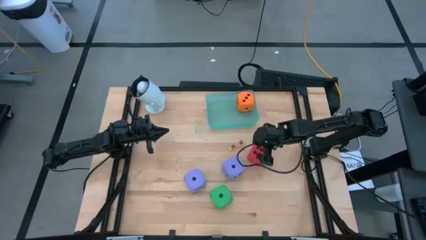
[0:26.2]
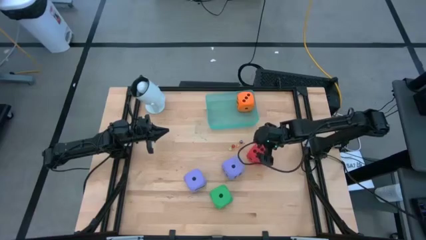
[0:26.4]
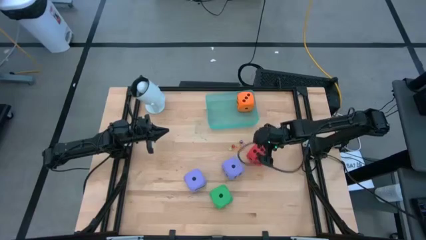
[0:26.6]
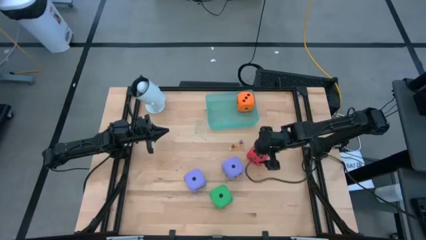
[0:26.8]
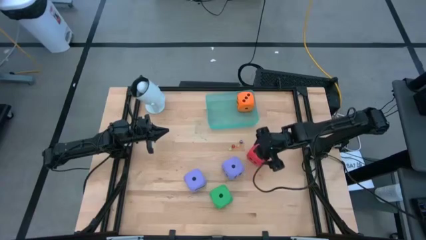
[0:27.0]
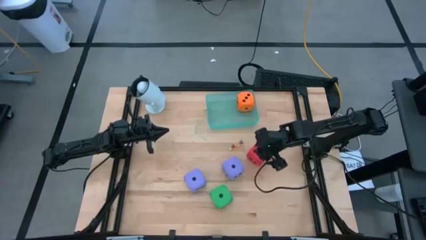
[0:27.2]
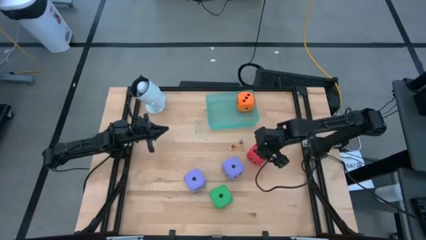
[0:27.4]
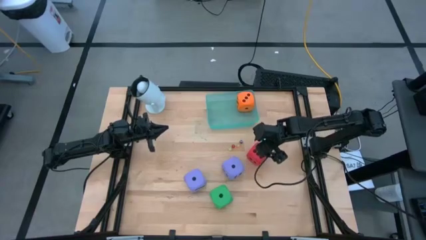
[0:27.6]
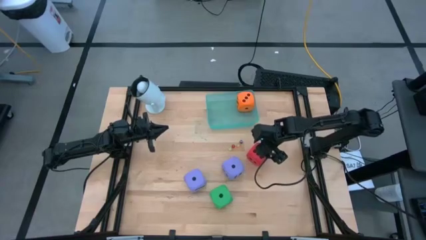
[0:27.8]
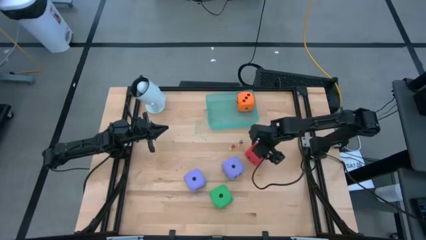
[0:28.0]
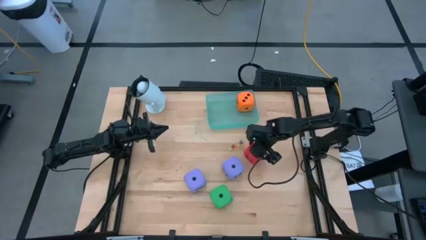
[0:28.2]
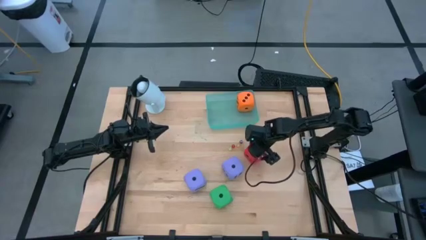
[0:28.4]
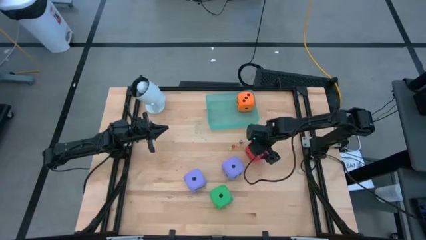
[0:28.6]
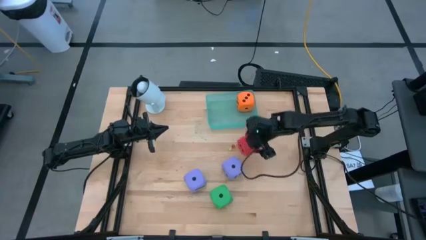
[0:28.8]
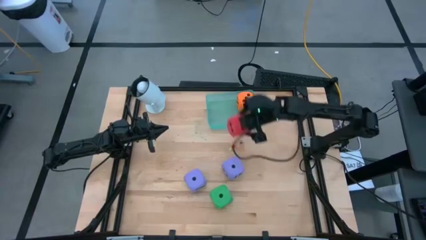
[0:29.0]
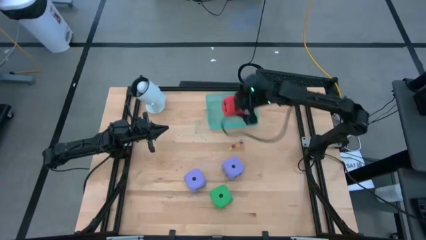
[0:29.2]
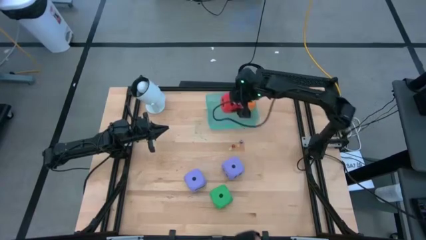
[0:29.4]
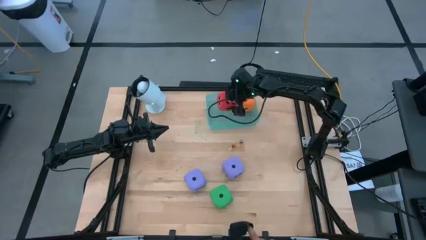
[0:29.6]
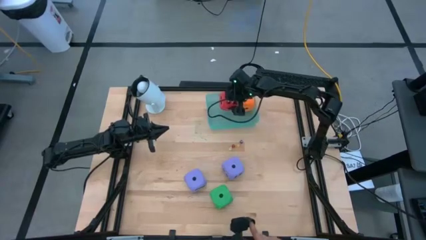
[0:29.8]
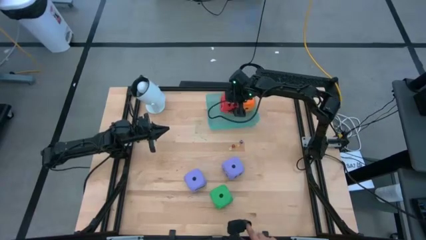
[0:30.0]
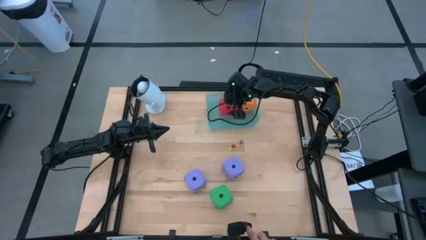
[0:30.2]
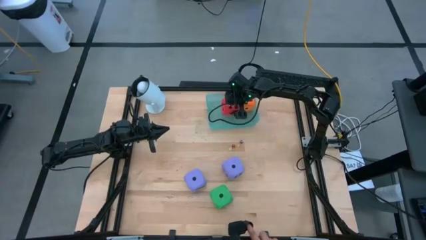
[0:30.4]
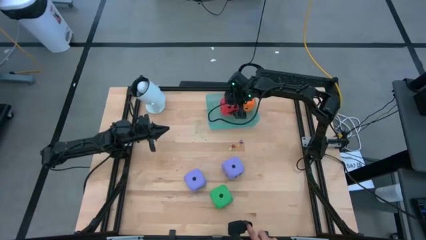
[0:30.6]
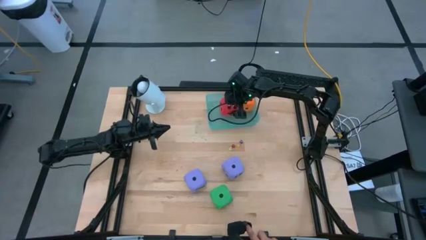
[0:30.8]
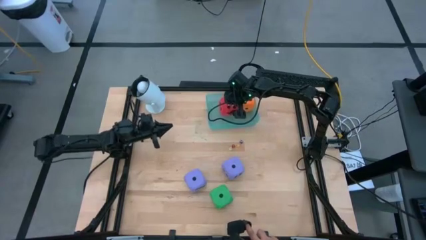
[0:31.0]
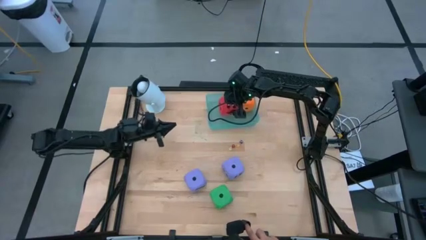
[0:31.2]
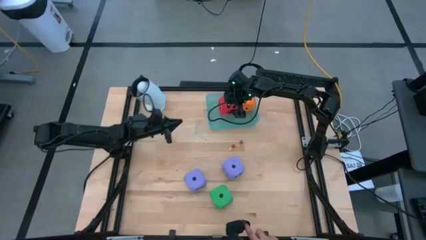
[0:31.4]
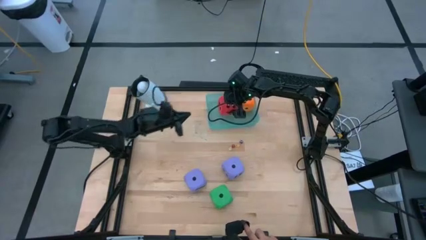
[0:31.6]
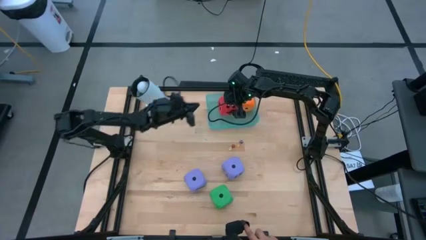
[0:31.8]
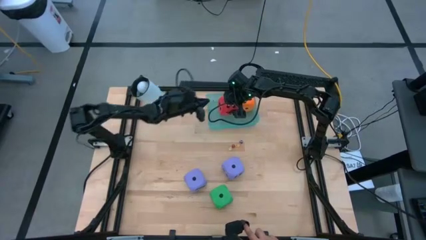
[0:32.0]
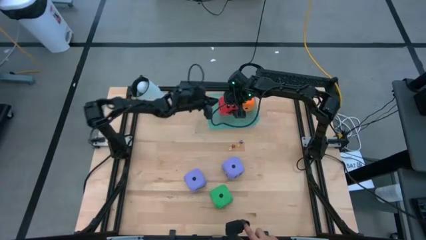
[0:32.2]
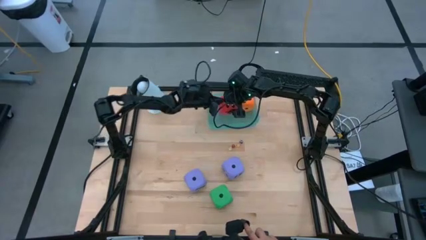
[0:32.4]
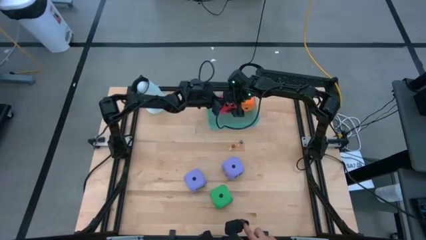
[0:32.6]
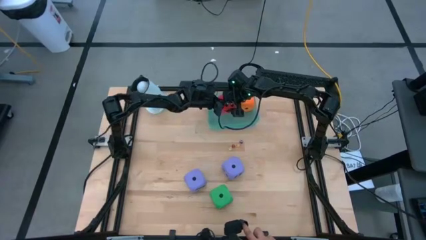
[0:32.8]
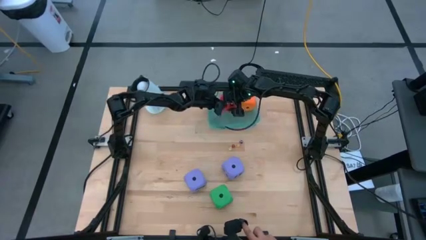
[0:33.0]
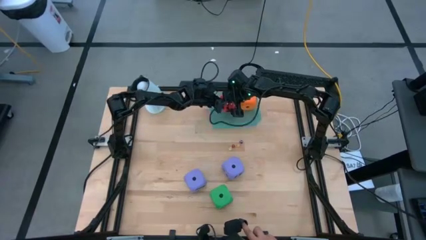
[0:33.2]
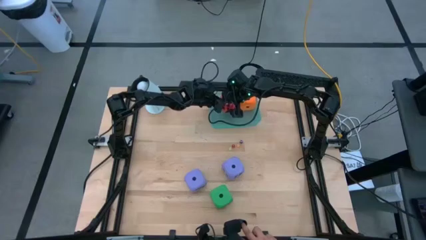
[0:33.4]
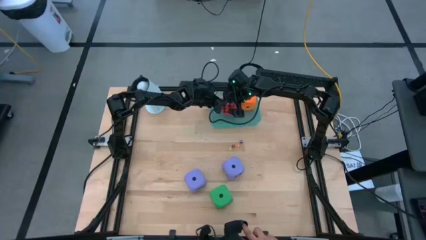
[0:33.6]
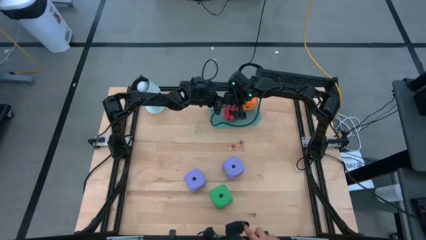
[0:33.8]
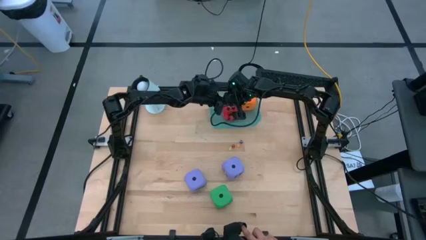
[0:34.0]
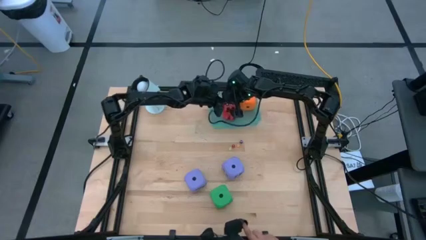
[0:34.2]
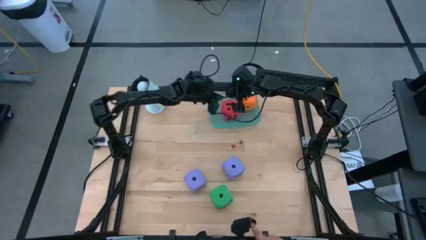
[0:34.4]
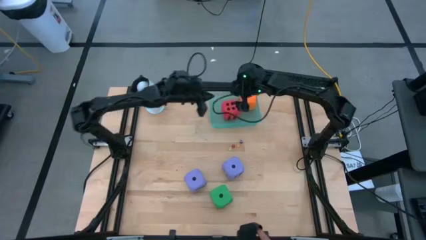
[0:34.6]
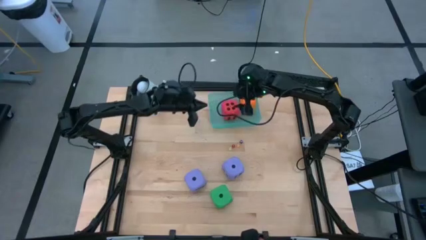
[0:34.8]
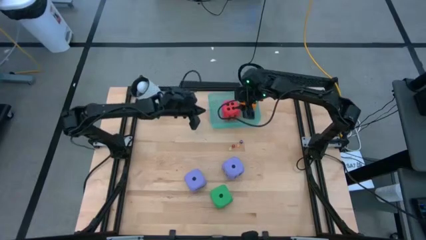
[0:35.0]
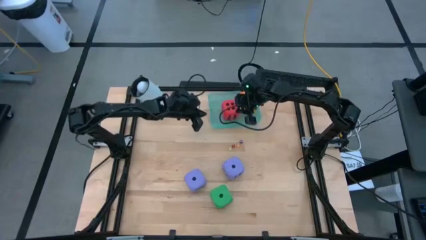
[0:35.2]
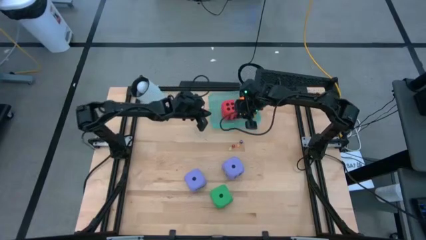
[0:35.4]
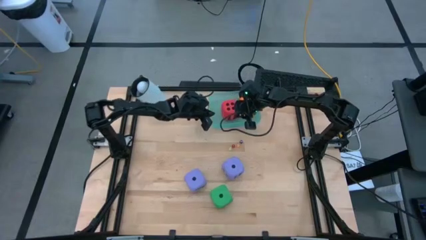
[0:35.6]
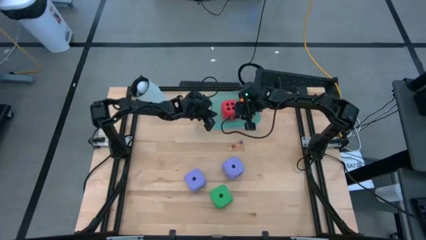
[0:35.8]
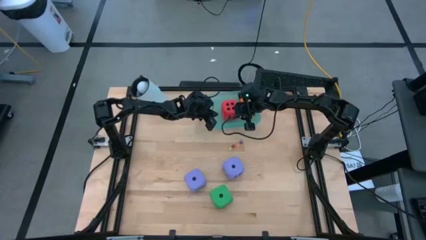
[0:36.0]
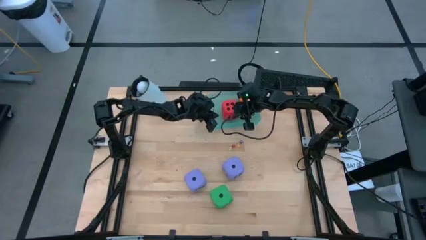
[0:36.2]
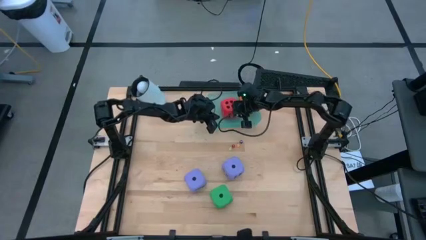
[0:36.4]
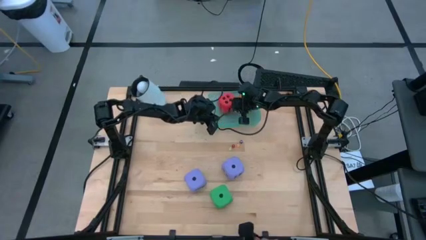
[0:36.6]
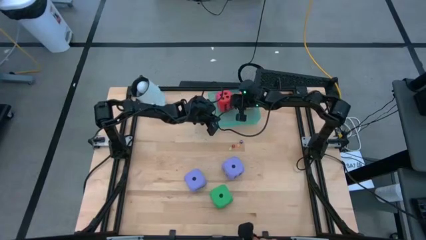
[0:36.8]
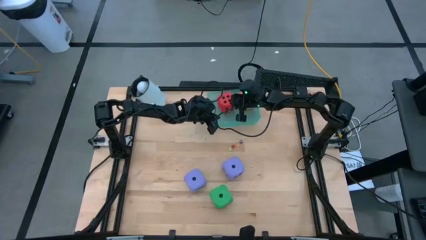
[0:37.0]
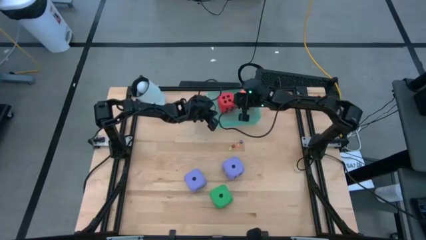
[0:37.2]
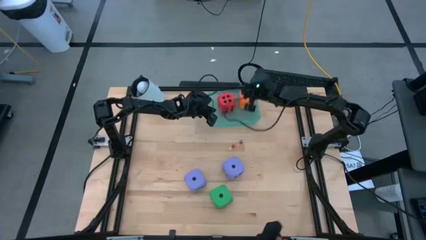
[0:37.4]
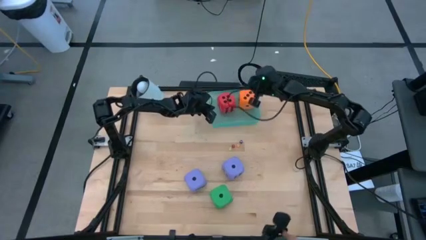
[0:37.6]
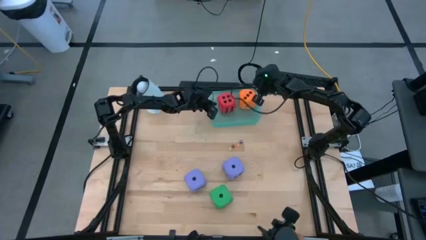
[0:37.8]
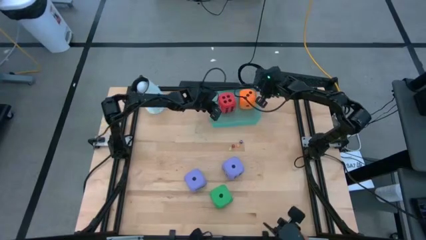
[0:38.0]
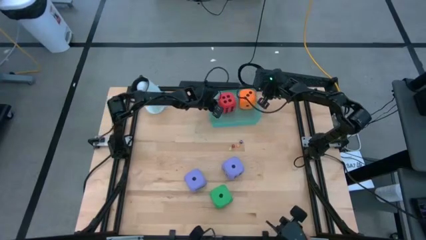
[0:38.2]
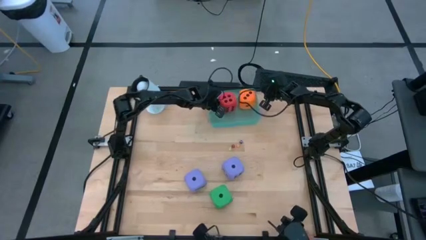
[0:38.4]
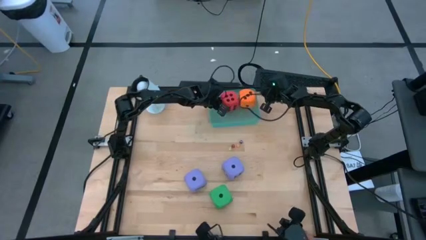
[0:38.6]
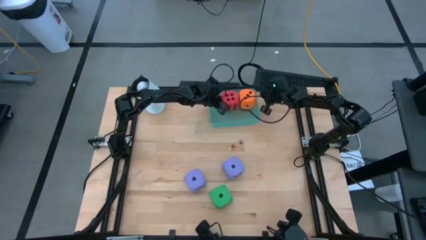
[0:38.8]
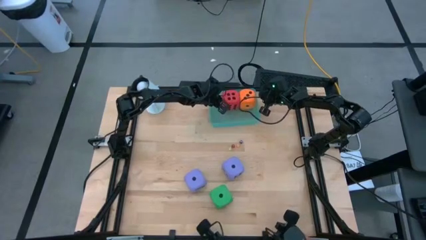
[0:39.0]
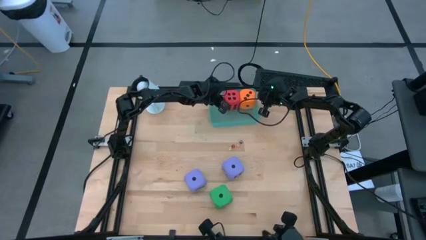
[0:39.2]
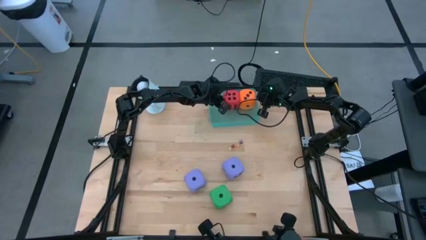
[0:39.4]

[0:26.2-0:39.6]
Task: Pick & Place Dice
Put the big red dice into the transparent blue bin

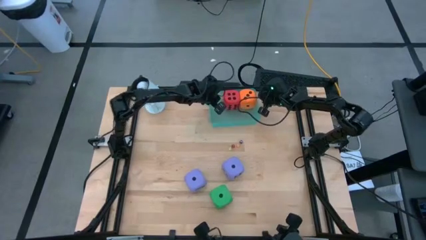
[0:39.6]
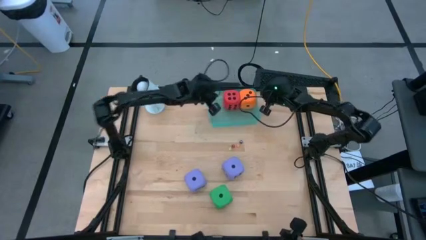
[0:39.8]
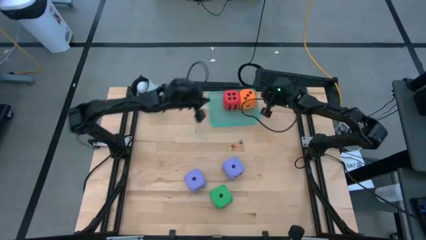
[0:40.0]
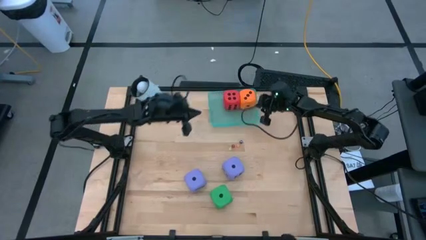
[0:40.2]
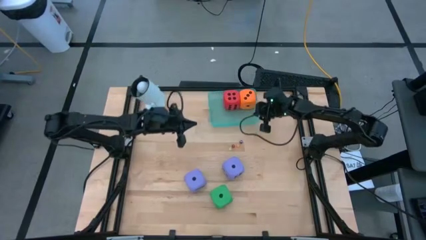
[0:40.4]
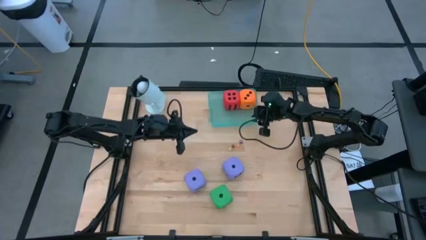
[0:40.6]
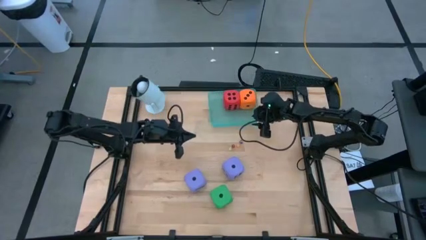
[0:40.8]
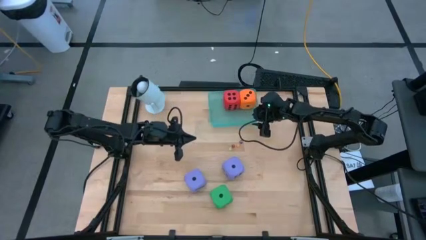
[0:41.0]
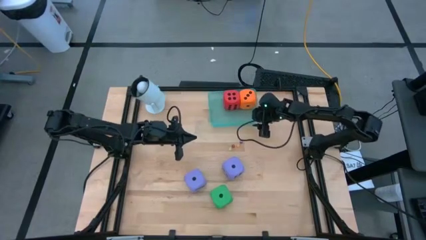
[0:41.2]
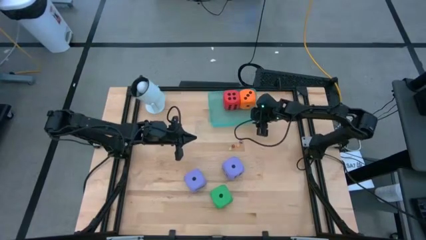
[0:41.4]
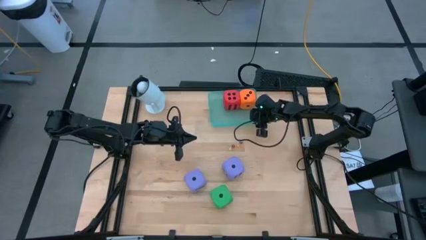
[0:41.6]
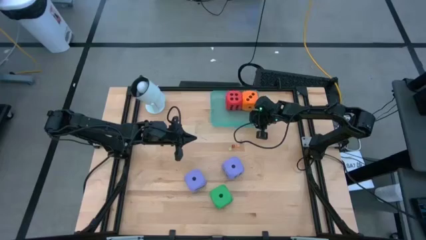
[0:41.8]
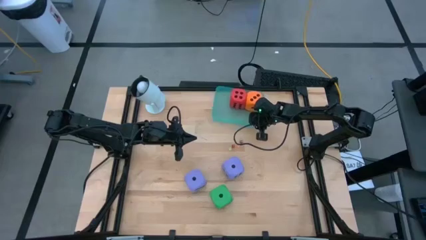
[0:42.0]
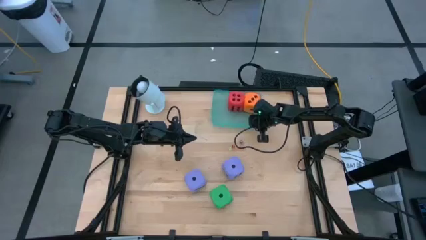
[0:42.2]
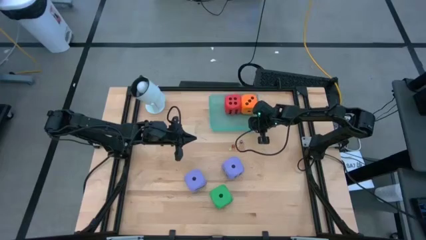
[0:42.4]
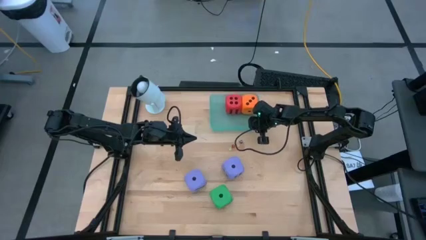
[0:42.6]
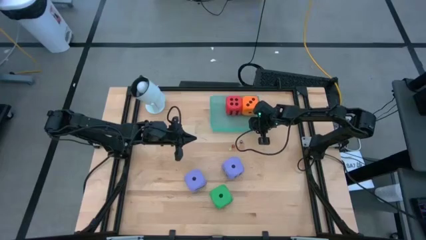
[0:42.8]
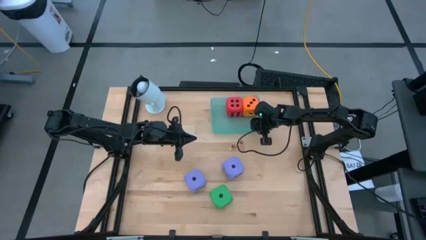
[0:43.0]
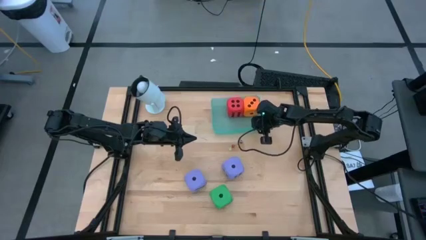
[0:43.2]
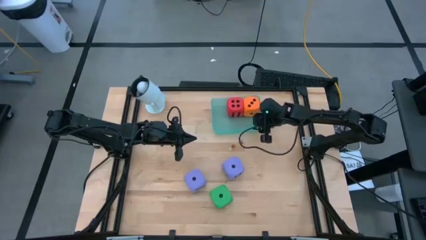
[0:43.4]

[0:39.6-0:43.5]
Adjust the transparent blue bin
